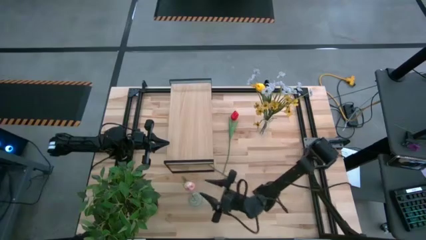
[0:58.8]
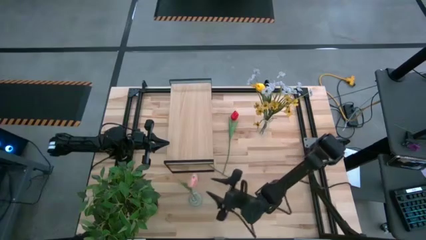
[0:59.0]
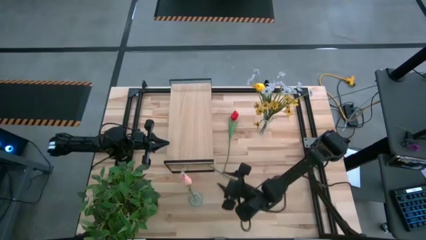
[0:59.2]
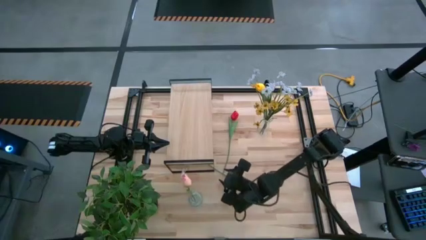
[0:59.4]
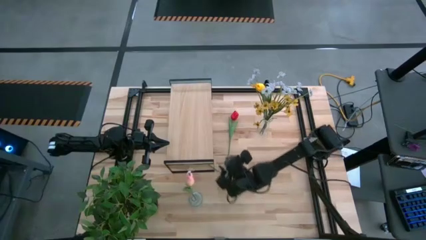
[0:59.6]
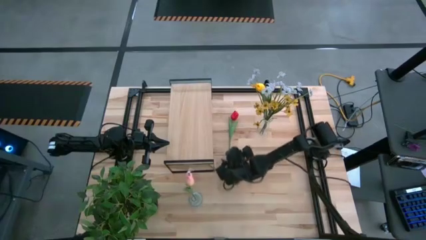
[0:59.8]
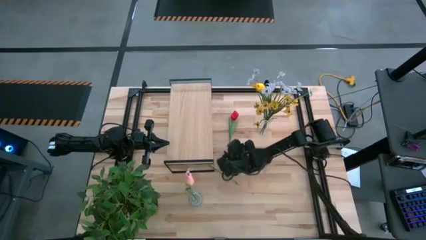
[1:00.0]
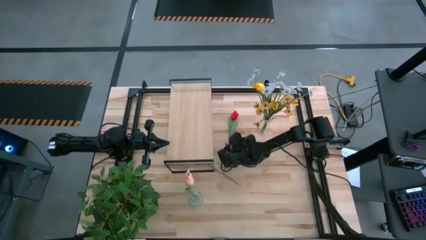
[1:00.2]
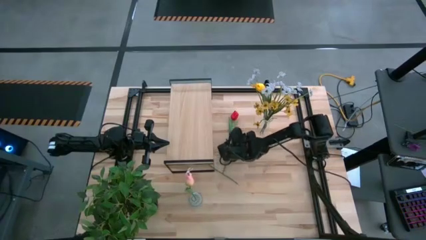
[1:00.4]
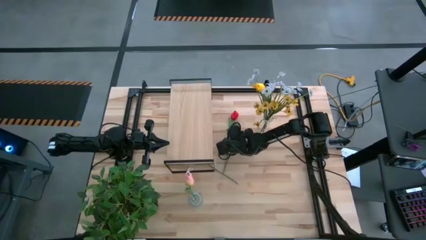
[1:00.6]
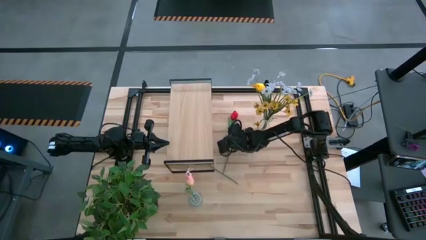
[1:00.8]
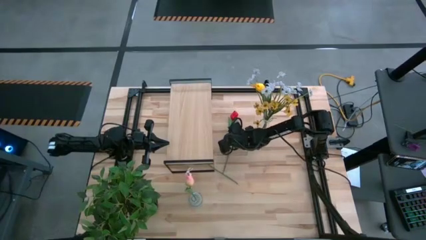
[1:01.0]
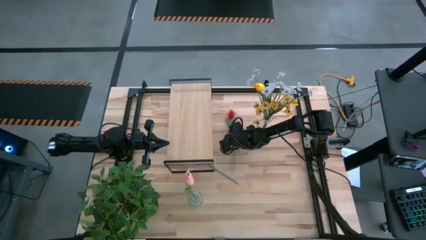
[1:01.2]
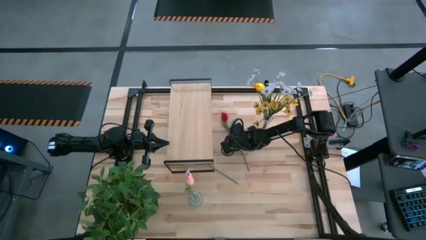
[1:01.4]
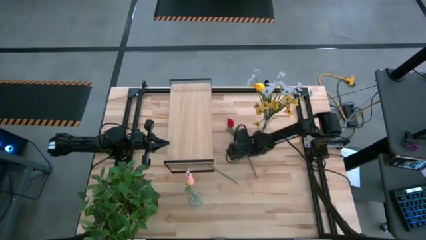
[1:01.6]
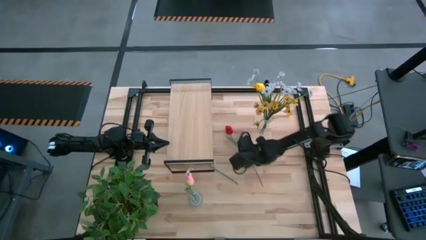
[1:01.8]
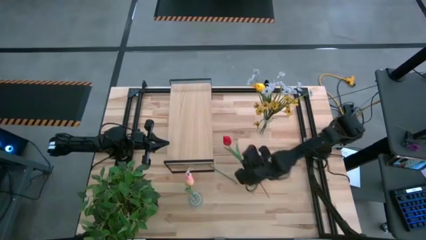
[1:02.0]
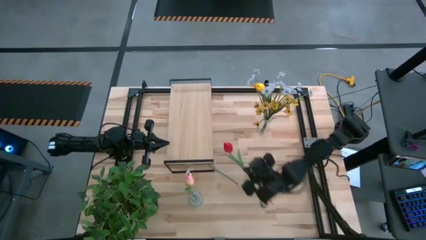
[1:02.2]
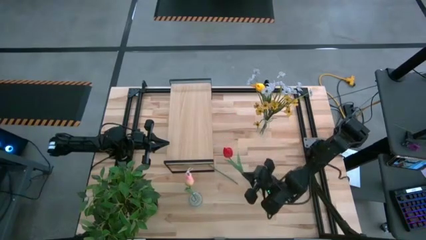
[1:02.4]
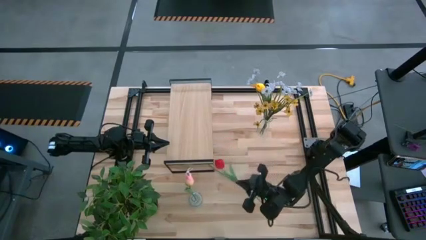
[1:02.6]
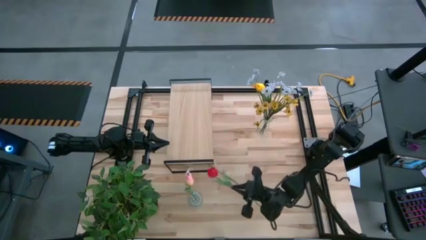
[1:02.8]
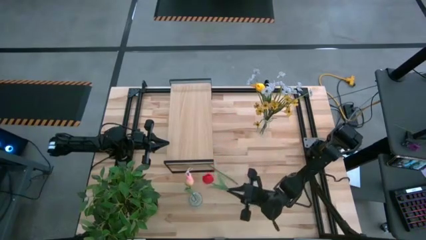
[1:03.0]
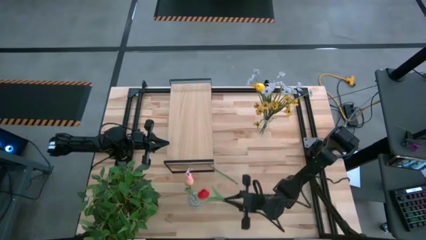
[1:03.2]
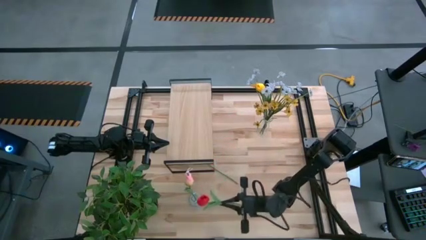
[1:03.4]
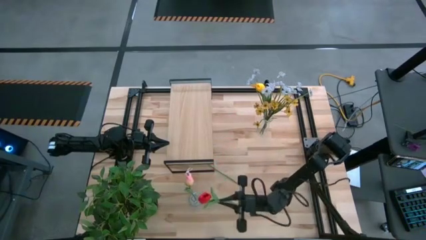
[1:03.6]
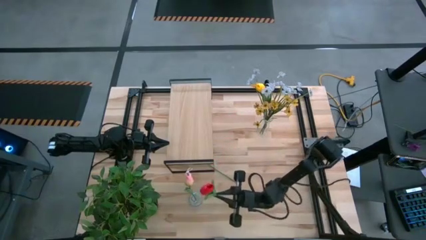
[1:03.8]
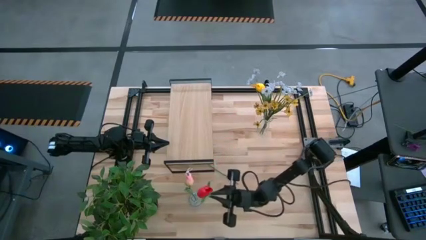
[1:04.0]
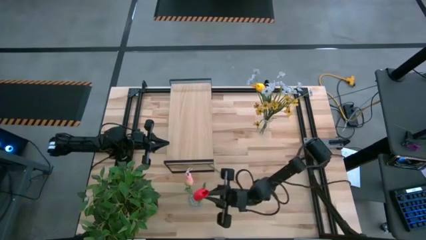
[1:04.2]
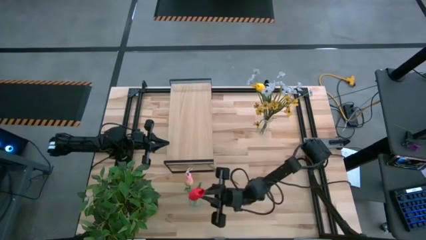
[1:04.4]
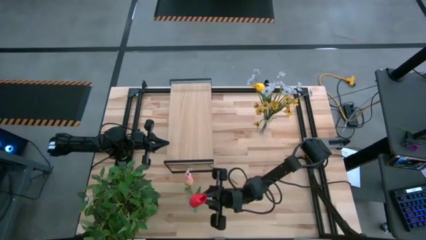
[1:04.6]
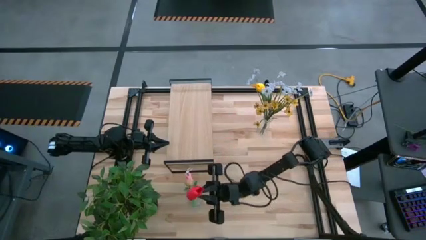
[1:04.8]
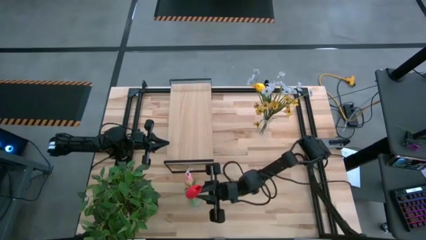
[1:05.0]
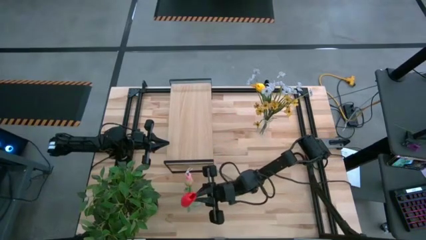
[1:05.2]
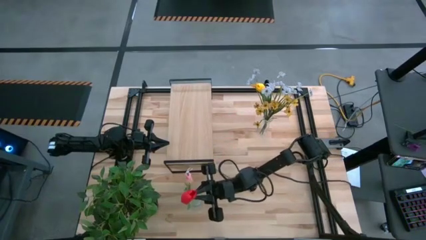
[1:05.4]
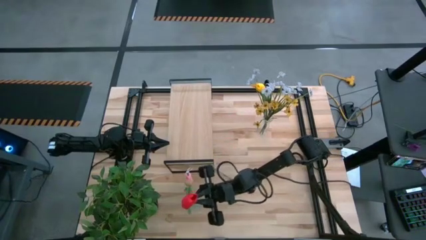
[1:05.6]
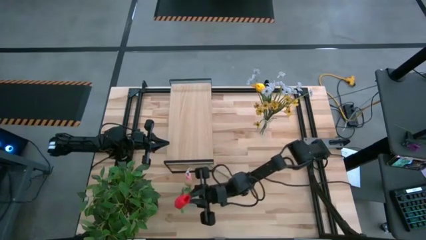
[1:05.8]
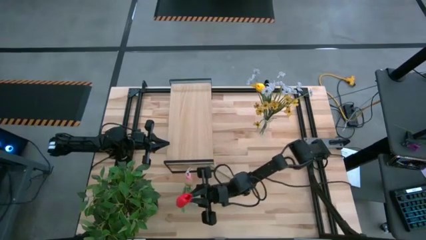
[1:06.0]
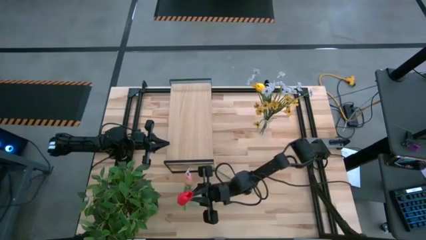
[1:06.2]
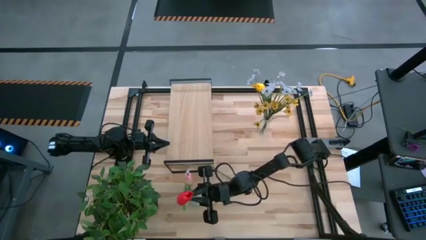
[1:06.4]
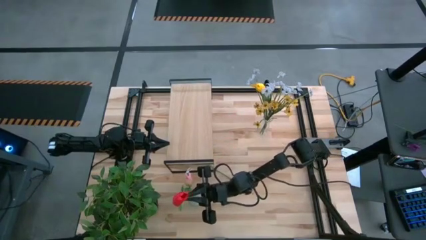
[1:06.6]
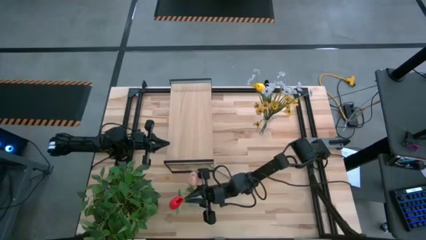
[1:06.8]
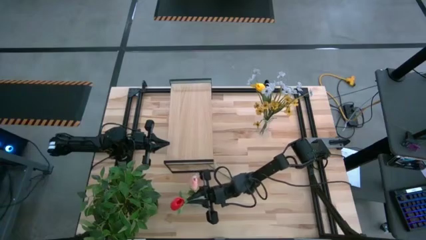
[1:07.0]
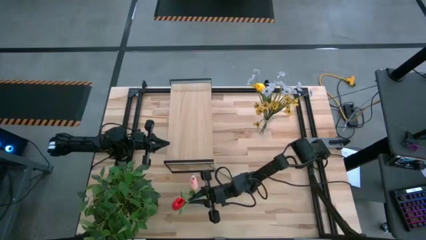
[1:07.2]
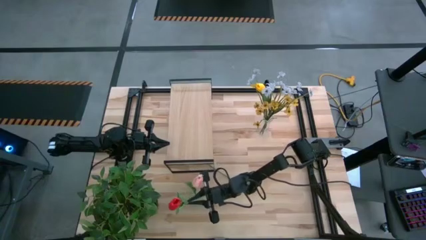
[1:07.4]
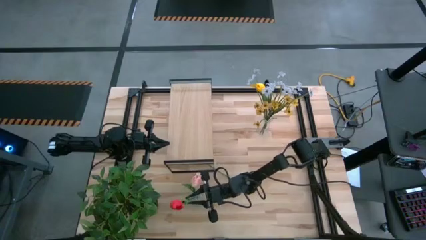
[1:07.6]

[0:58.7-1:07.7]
Task: Pick and place flowers into a vace then onto a shelf
Put the red flower into the bottom transparent vase

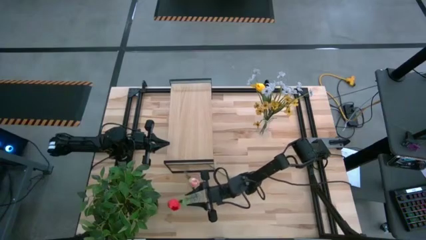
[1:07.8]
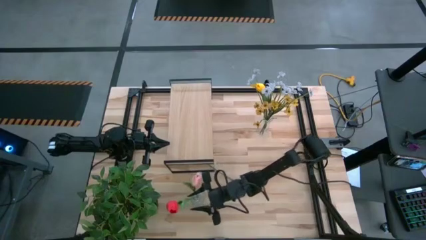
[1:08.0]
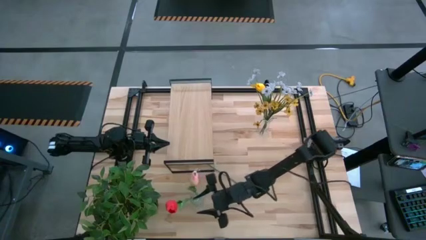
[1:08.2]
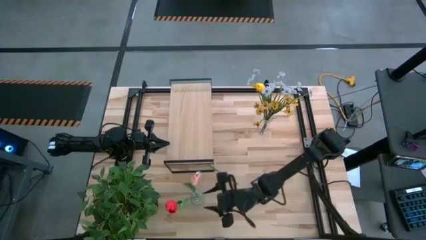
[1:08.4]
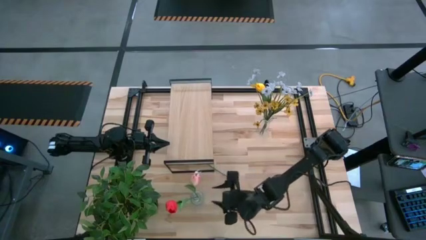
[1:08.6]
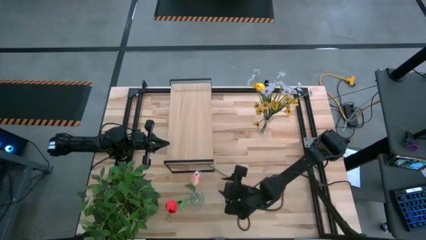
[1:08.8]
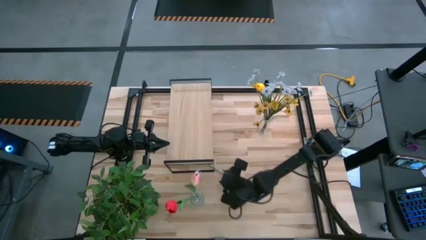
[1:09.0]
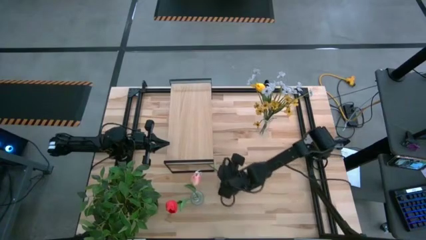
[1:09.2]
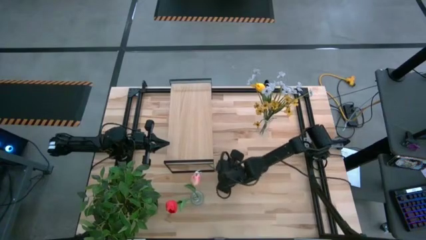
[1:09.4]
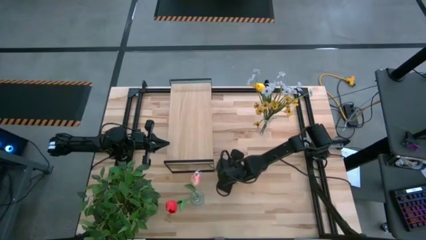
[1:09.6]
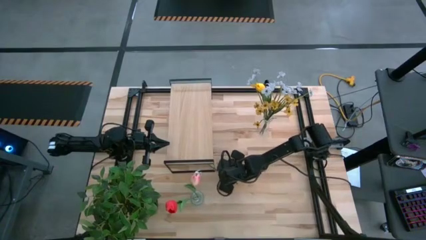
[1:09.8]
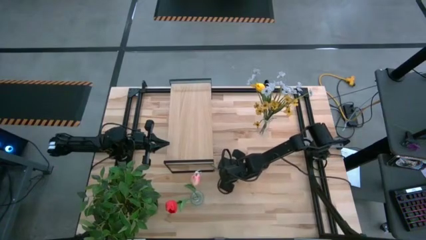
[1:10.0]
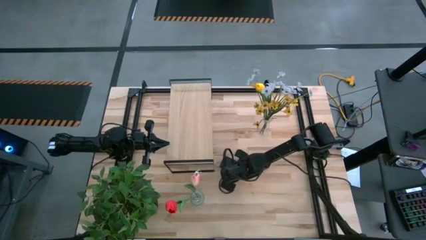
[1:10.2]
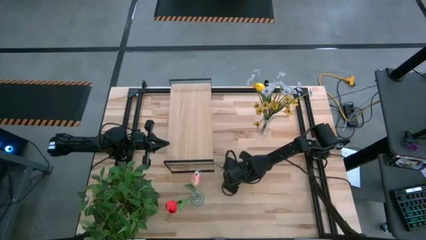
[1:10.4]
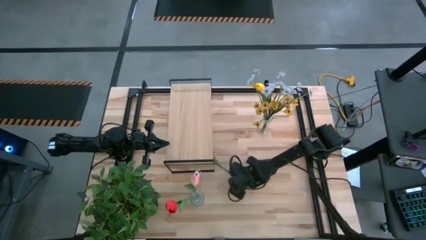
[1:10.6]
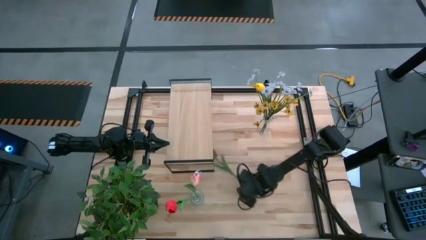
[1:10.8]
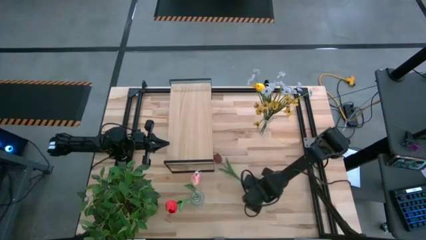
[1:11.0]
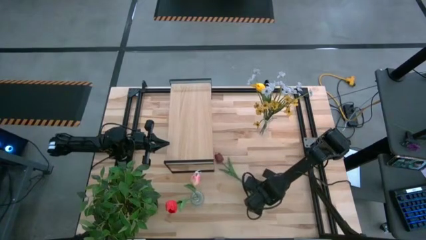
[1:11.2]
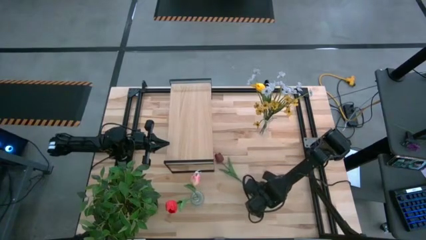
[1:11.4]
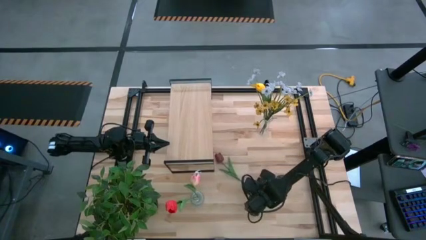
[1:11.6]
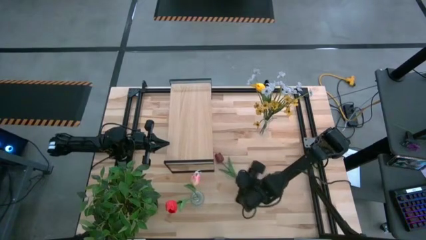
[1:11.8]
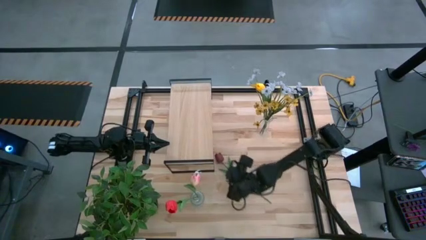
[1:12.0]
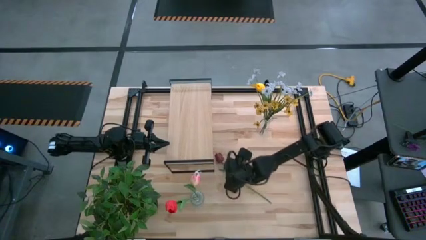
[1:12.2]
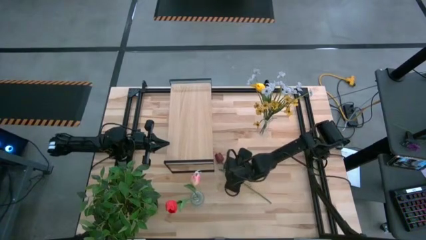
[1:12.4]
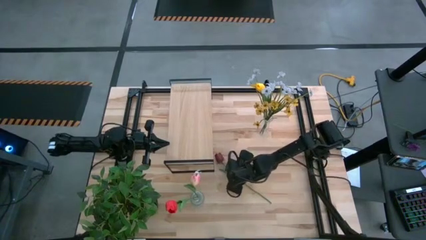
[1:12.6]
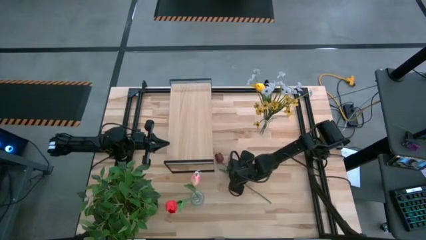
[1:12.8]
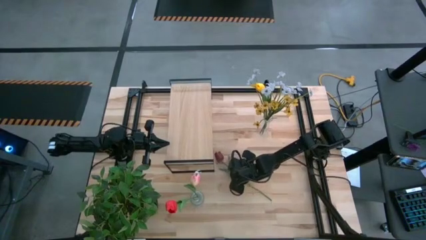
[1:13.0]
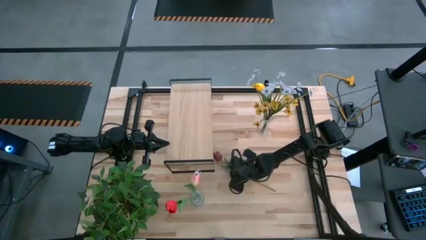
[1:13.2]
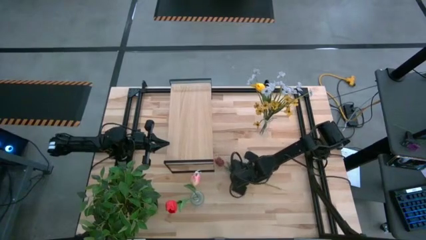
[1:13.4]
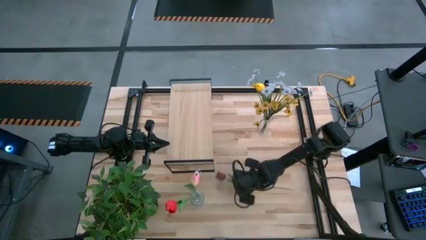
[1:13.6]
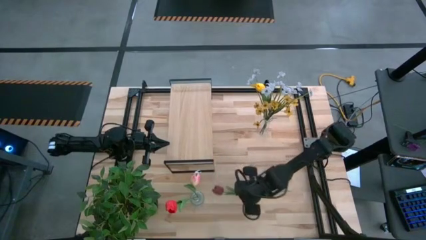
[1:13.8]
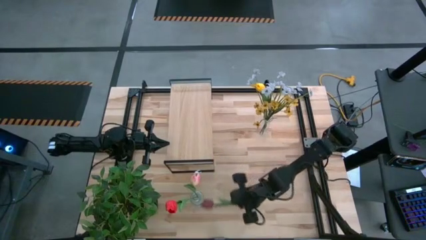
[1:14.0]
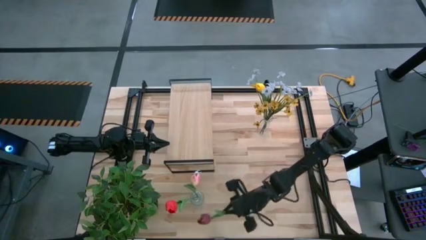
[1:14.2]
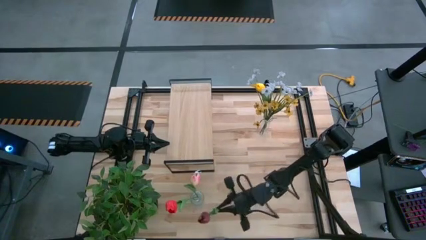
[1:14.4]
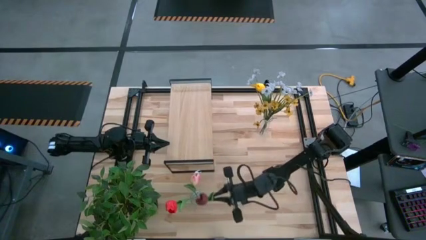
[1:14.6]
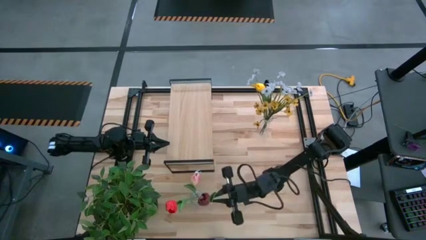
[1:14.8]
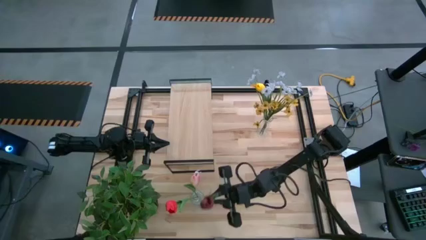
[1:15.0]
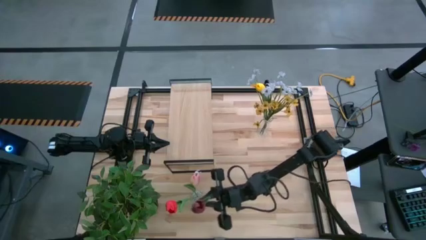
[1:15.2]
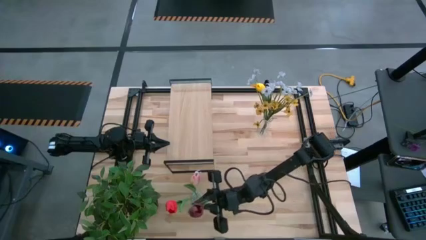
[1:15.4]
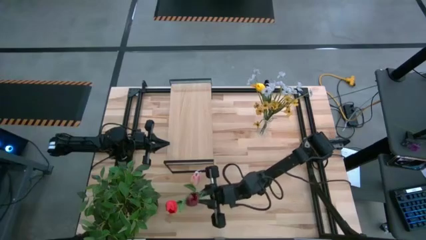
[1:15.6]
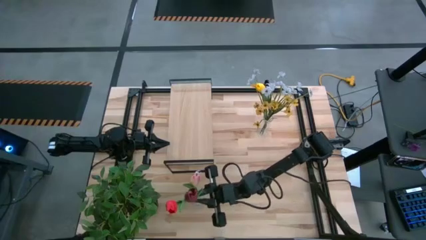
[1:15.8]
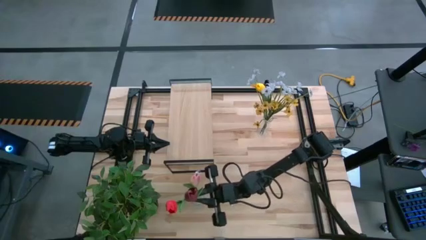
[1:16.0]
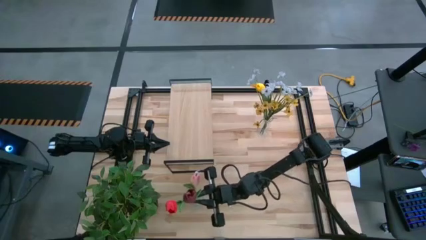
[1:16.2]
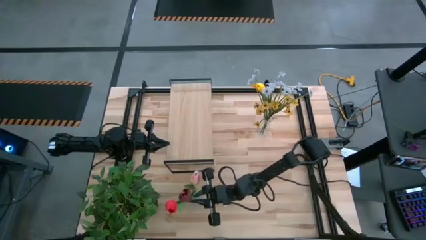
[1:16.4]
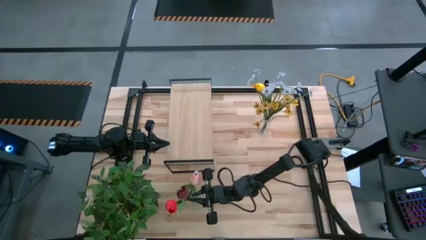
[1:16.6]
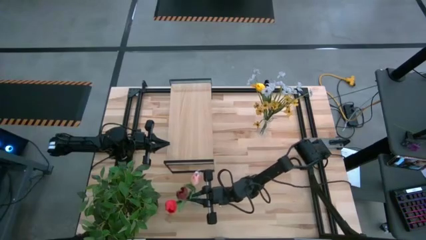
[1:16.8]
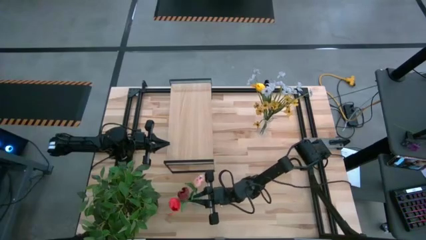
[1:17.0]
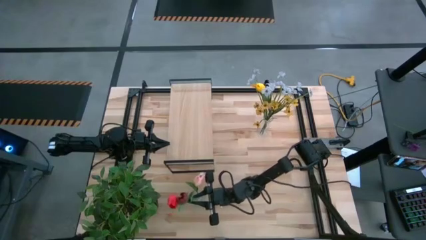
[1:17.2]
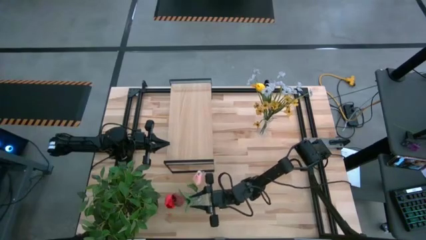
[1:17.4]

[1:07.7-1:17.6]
Put the dark red flower into the bottom transparent vase
